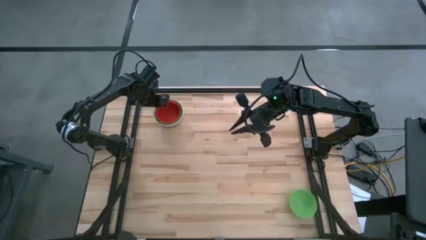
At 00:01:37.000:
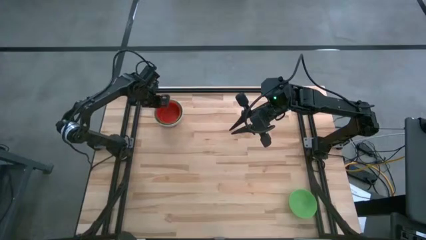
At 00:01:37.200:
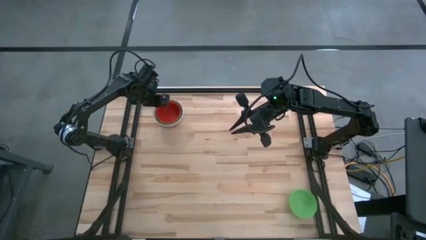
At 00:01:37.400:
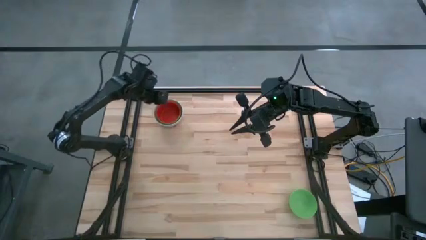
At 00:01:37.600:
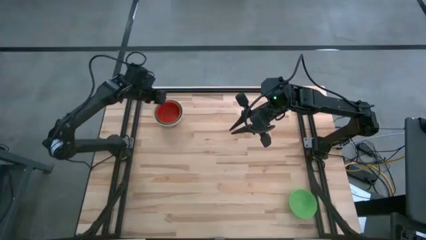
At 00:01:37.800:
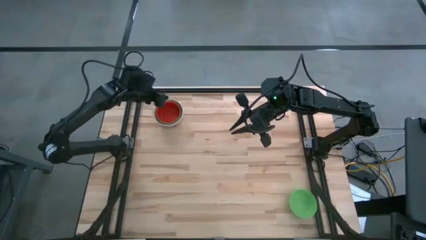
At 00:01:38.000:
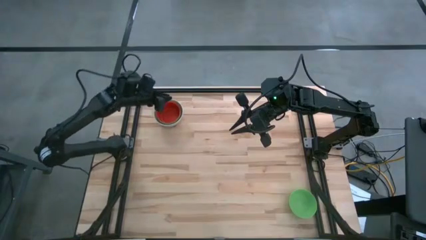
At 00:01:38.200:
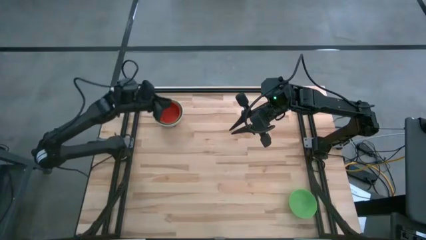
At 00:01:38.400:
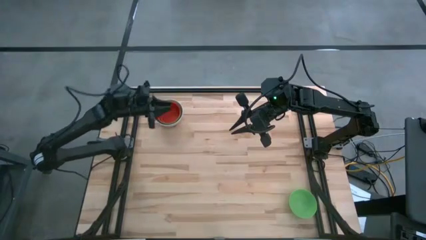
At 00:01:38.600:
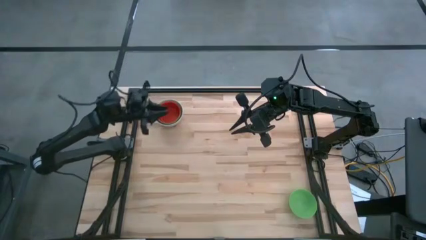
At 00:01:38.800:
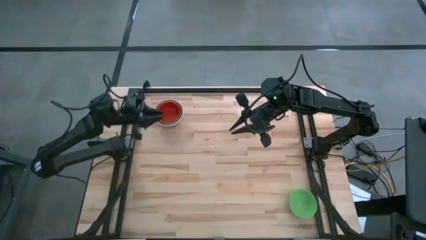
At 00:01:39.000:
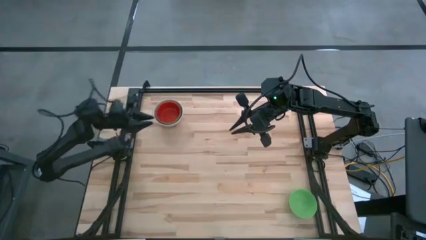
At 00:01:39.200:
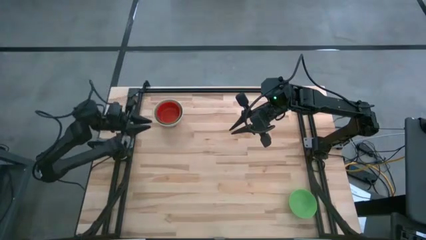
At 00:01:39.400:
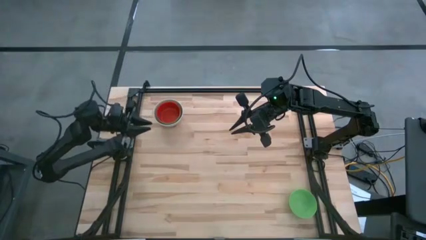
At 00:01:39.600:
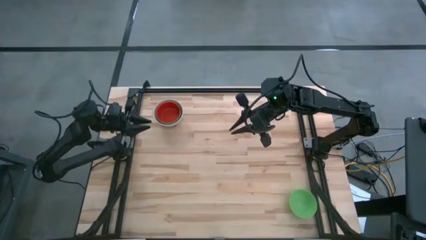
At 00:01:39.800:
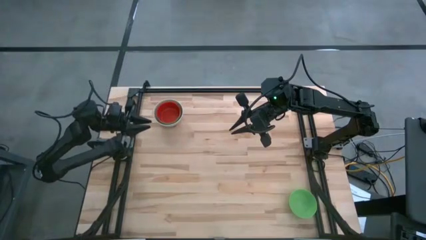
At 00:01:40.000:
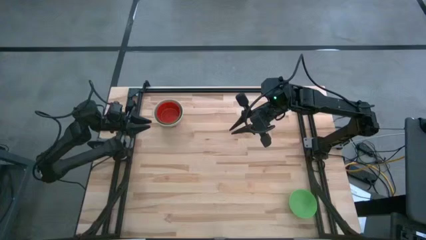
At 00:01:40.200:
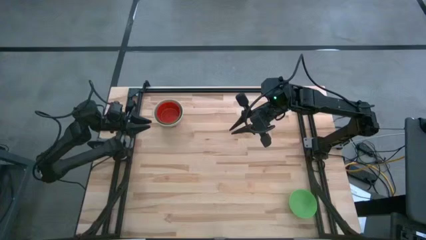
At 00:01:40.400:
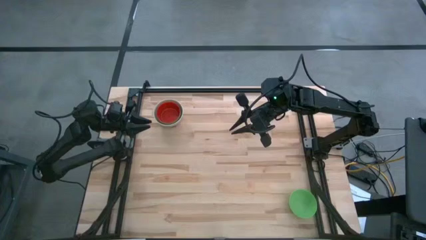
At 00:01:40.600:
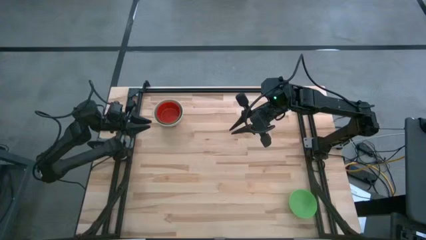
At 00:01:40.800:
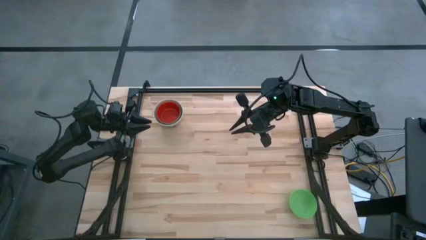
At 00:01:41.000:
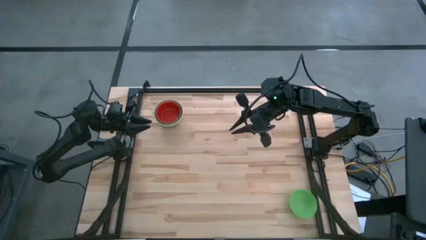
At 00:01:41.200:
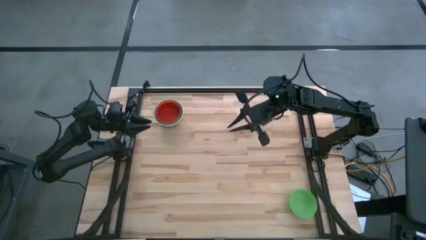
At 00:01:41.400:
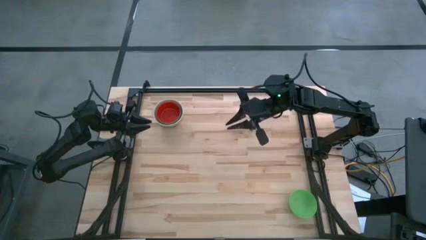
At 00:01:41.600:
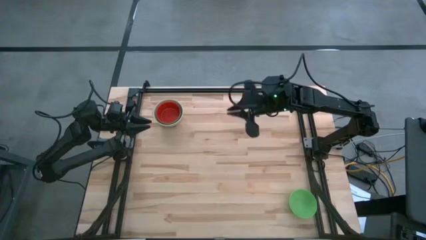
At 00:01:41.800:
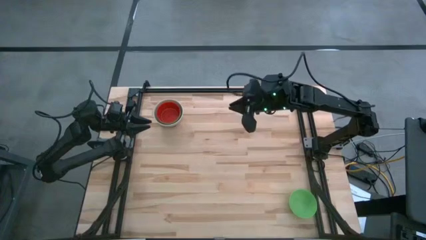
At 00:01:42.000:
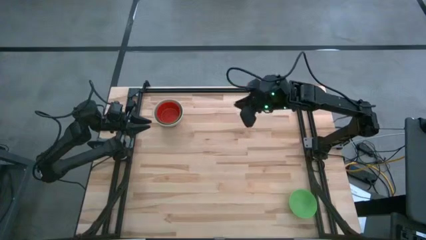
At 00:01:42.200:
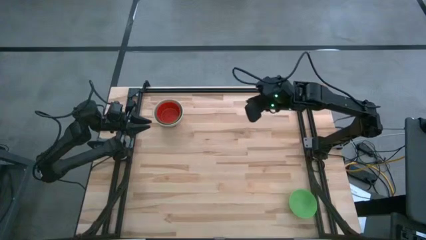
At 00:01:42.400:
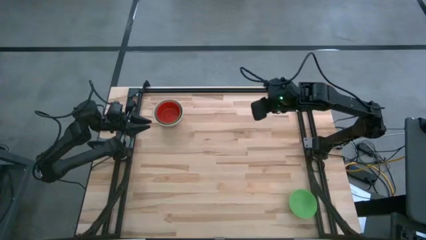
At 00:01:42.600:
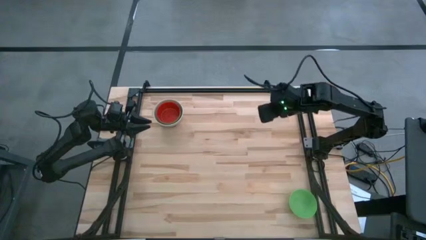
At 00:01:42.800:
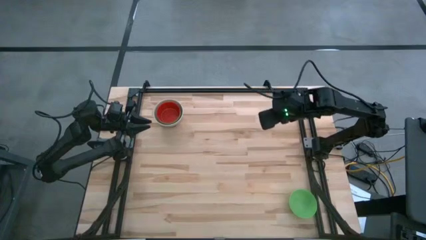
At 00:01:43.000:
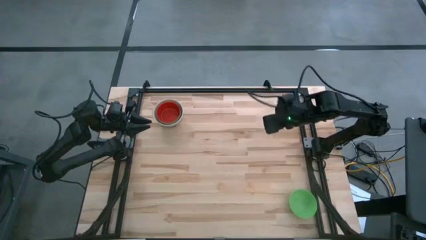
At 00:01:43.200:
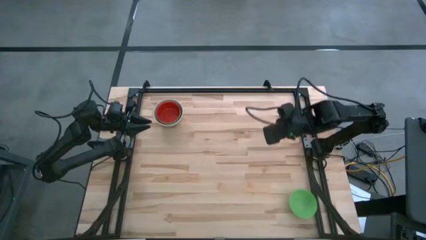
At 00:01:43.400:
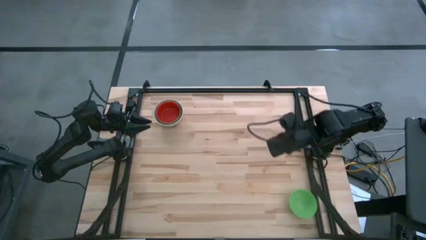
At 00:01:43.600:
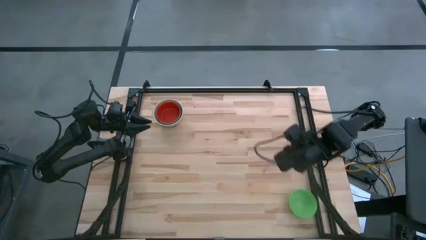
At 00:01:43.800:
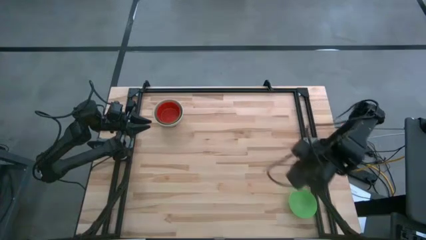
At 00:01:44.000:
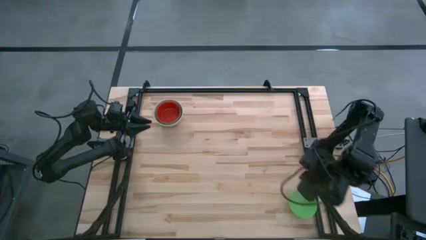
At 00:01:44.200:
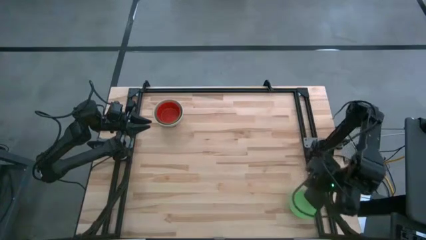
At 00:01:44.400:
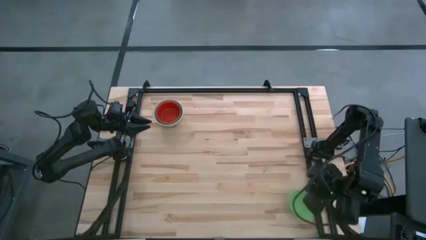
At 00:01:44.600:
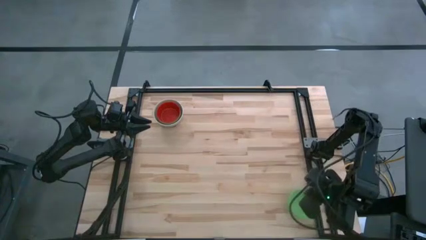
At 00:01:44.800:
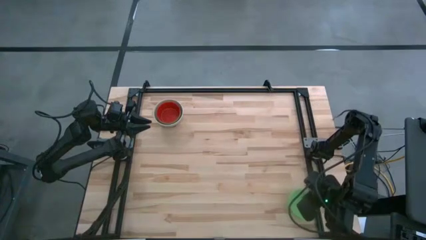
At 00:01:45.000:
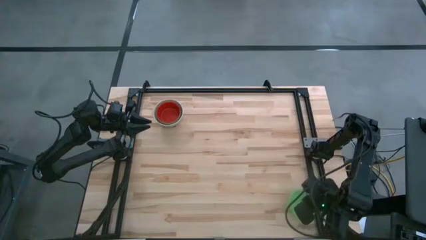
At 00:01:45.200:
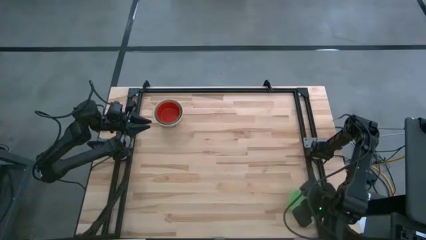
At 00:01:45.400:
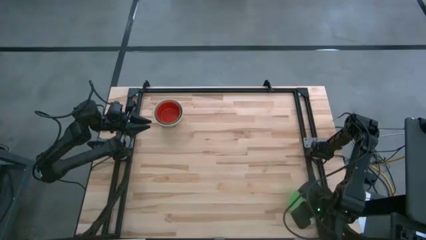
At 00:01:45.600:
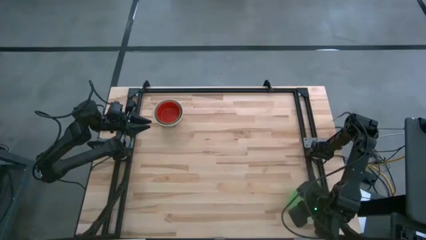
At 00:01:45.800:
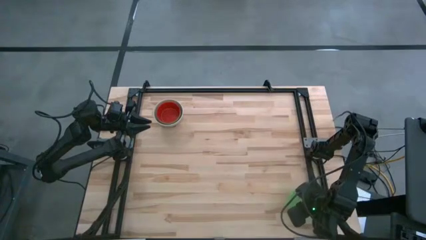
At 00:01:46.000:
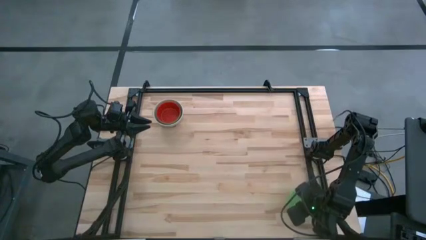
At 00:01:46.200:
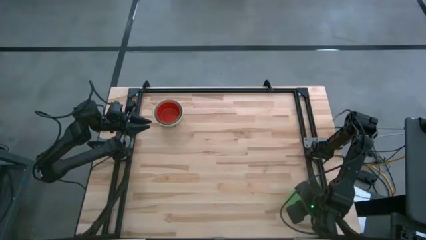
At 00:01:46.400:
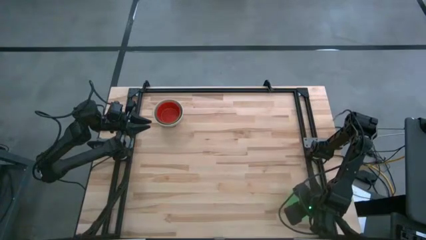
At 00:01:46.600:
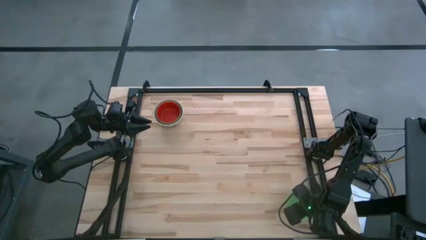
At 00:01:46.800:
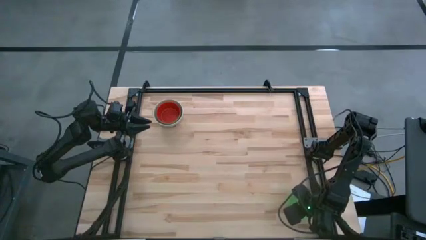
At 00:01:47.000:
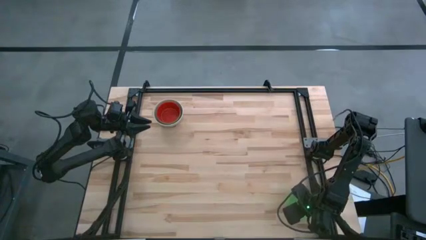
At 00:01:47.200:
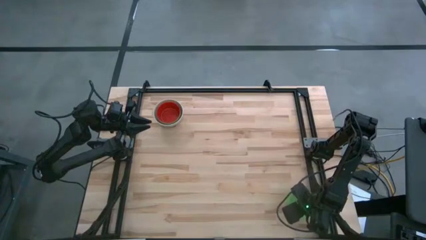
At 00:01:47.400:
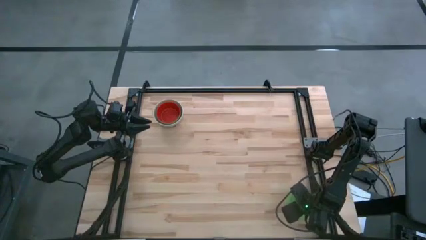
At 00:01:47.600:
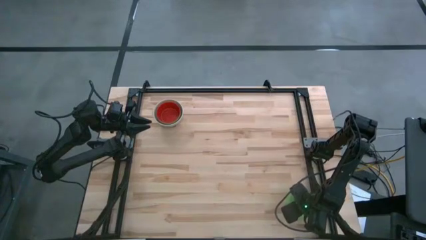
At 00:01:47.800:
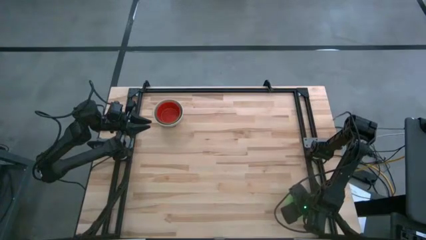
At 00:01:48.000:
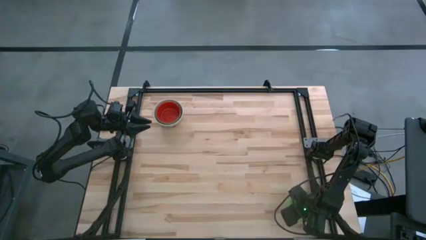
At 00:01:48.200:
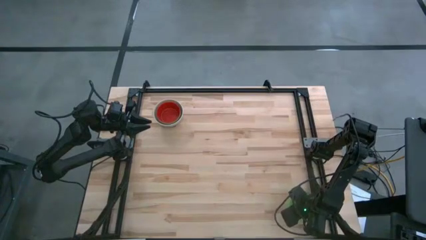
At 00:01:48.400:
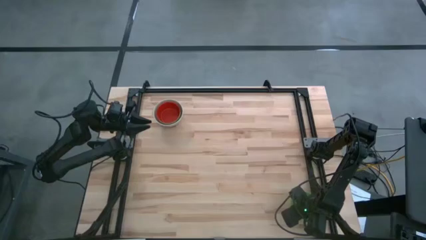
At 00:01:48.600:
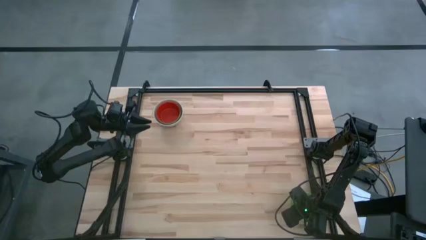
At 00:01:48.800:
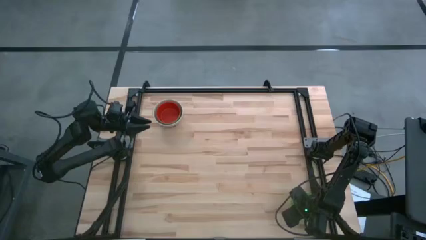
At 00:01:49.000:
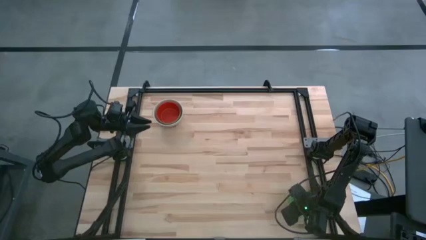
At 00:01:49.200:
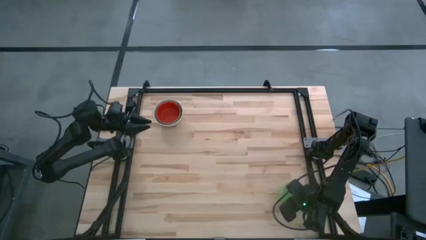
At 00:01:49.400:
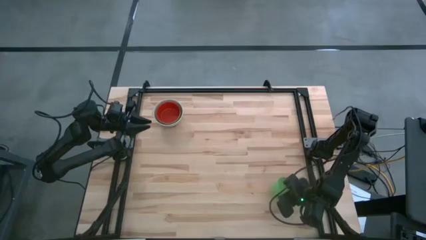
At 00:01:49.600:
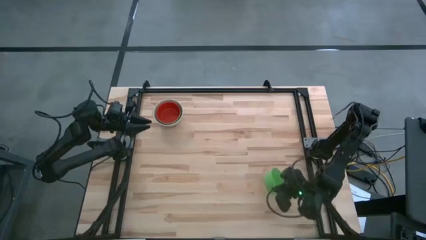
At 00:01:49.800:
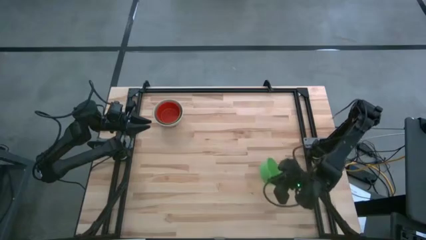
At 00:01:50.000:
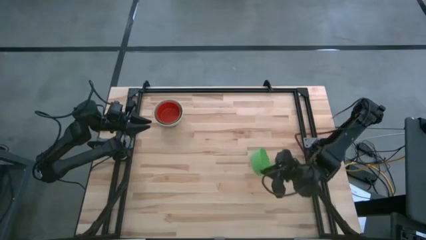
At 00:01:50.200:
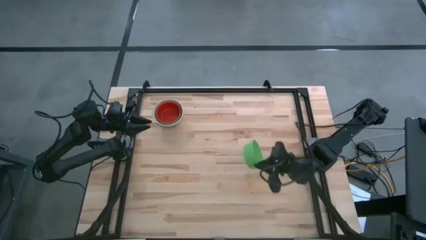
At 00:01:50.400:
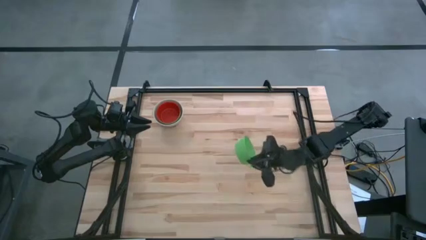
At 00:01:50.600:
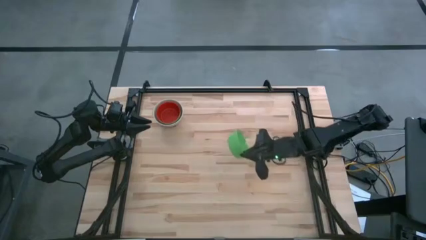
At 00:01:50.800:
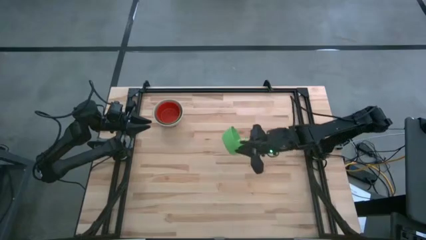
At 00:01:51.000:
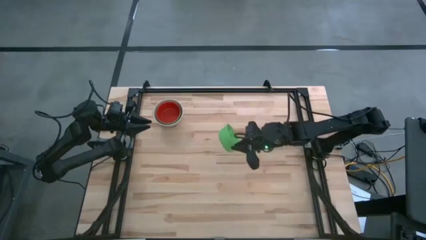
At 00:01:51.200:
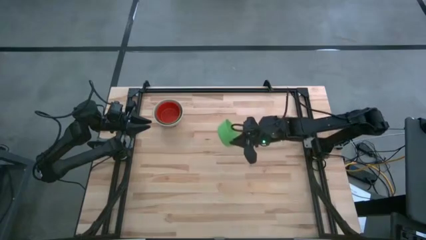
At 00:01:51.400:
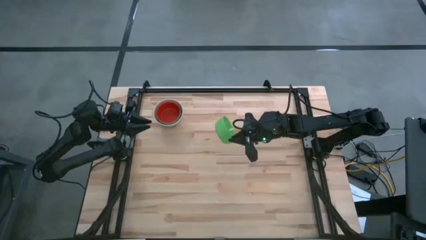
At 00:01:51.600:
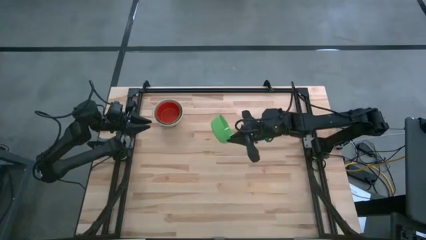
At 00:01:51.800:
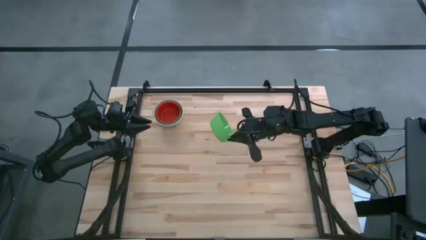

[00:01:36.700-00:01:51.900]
Stack the green bowl on the red bowl
